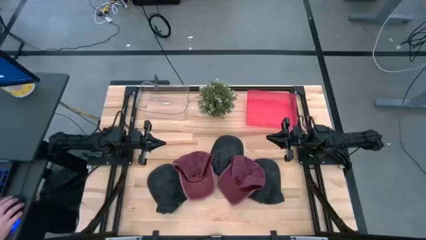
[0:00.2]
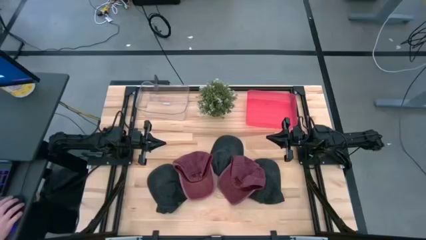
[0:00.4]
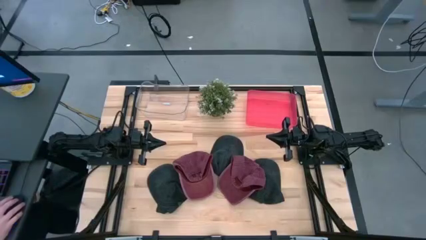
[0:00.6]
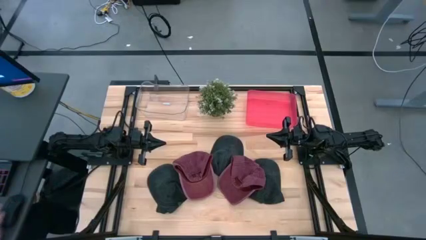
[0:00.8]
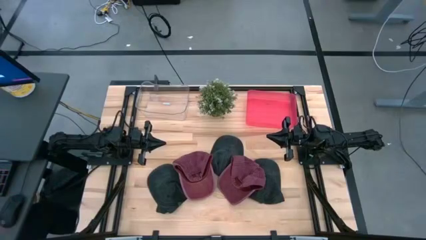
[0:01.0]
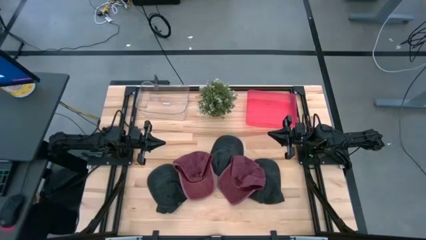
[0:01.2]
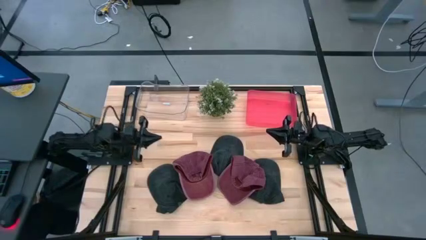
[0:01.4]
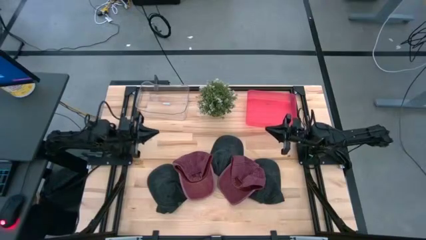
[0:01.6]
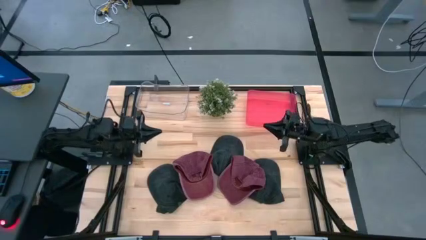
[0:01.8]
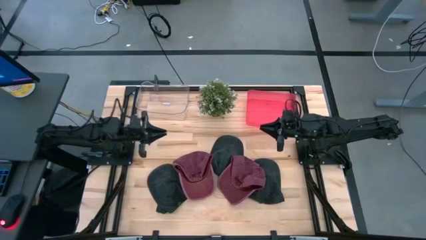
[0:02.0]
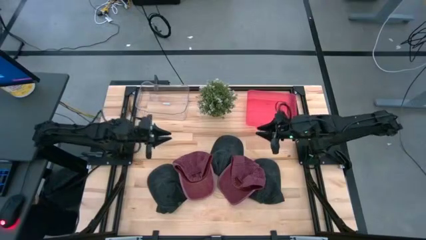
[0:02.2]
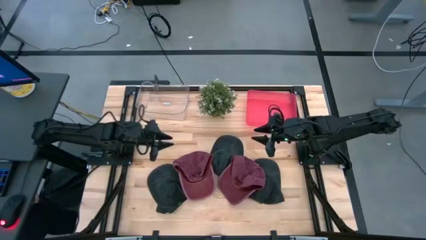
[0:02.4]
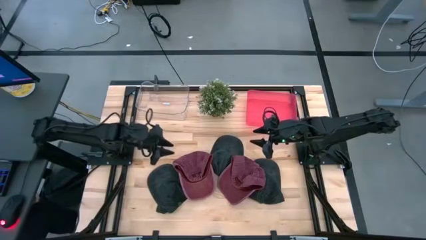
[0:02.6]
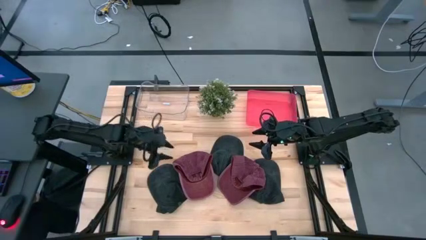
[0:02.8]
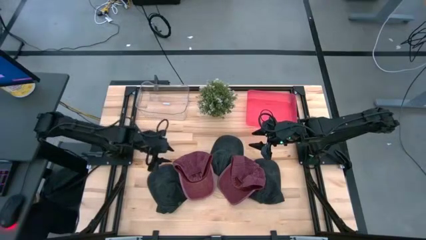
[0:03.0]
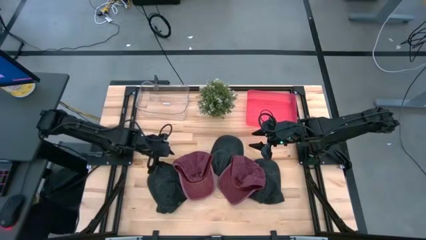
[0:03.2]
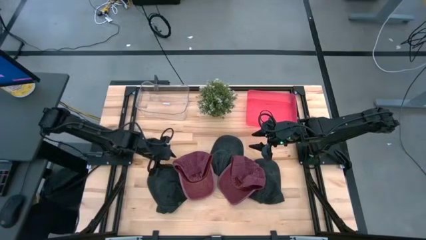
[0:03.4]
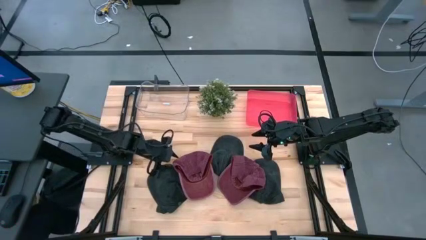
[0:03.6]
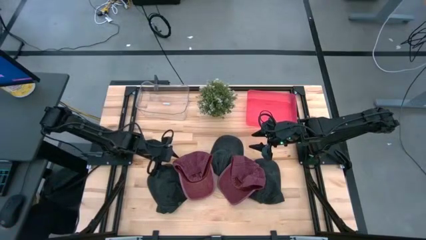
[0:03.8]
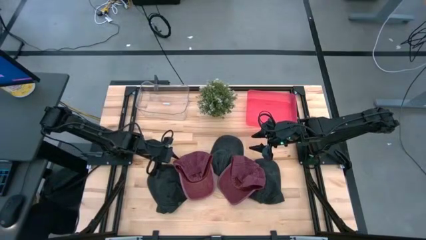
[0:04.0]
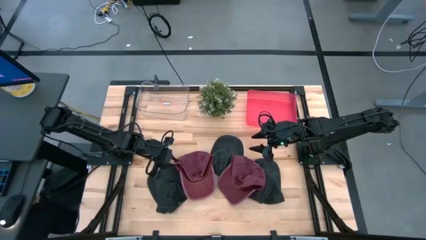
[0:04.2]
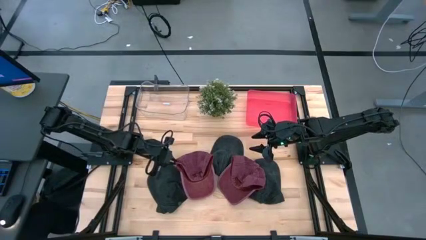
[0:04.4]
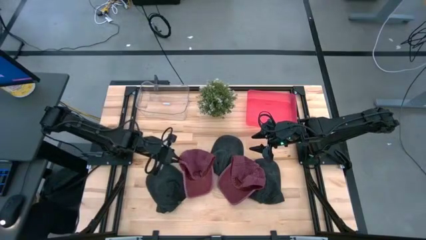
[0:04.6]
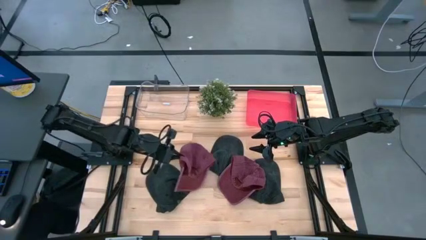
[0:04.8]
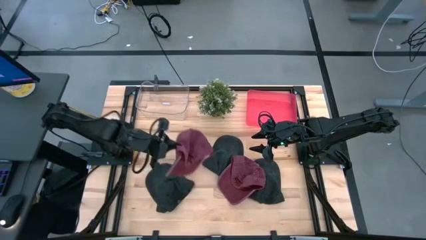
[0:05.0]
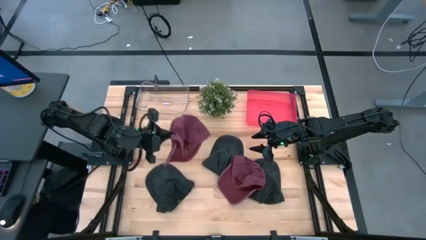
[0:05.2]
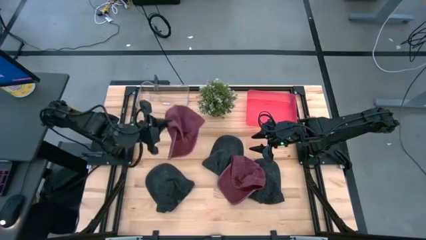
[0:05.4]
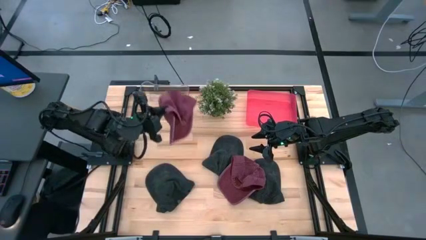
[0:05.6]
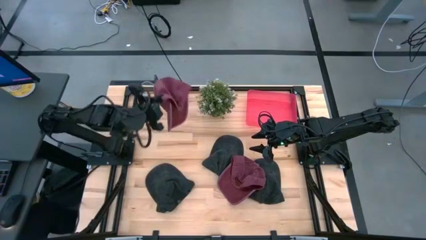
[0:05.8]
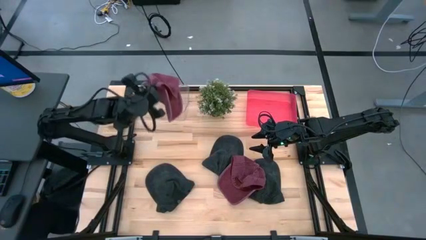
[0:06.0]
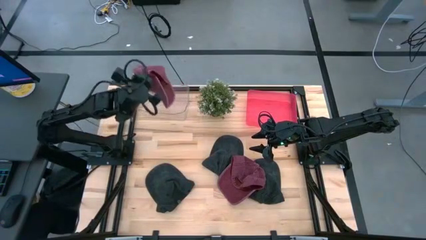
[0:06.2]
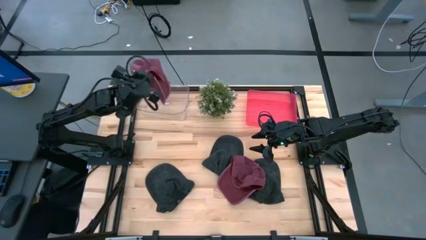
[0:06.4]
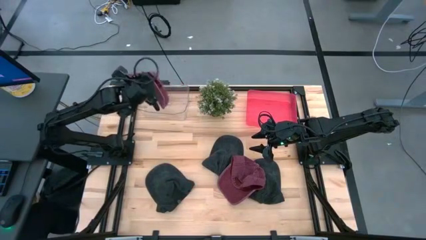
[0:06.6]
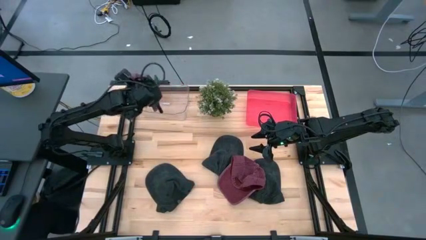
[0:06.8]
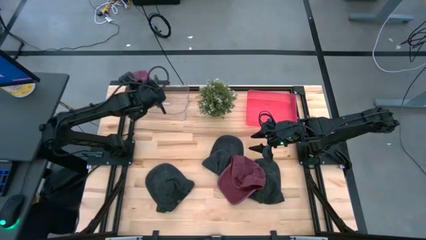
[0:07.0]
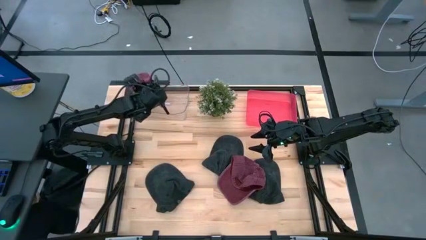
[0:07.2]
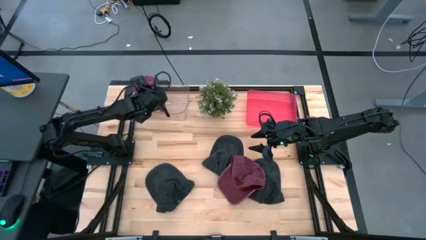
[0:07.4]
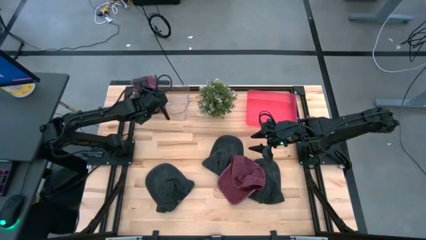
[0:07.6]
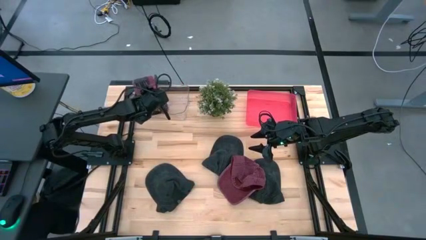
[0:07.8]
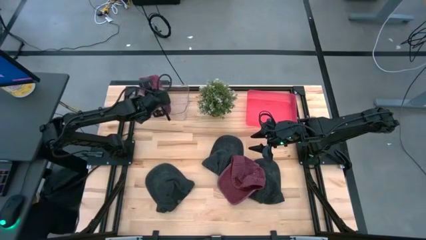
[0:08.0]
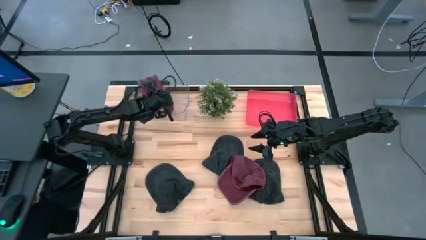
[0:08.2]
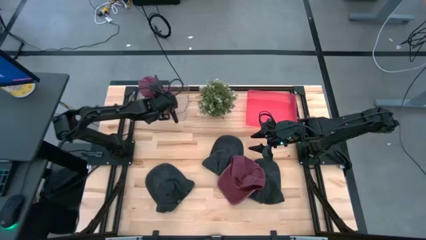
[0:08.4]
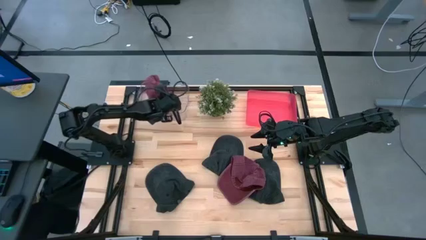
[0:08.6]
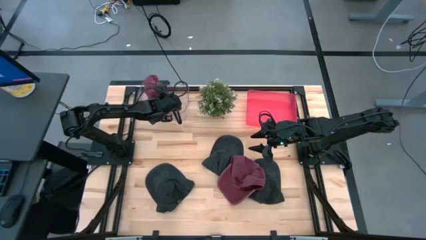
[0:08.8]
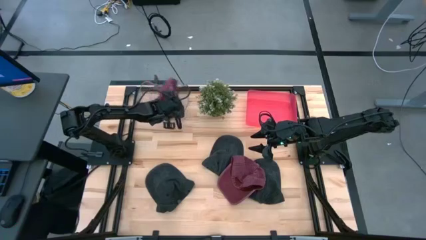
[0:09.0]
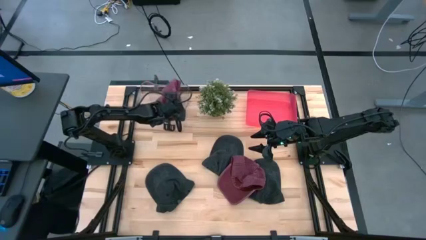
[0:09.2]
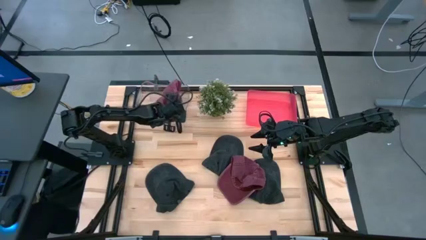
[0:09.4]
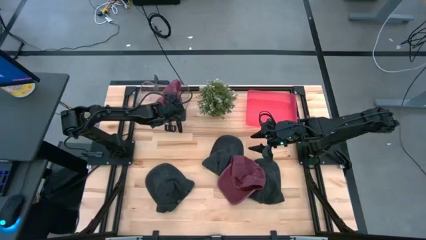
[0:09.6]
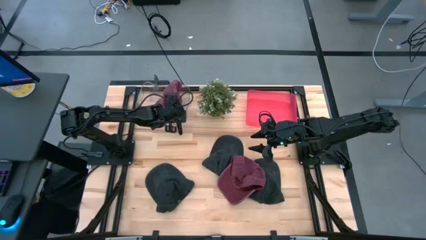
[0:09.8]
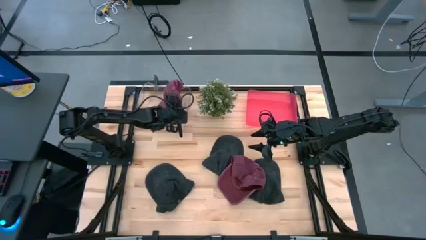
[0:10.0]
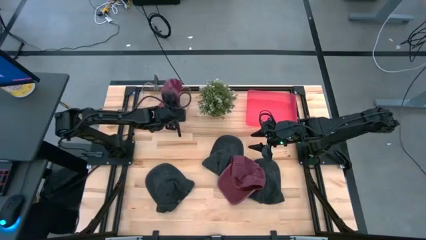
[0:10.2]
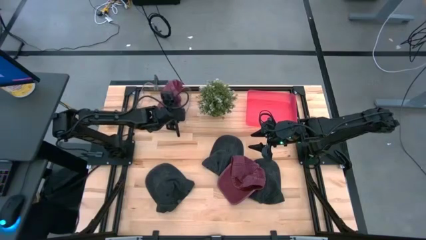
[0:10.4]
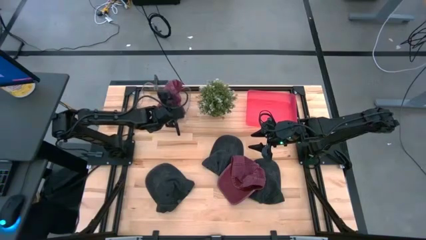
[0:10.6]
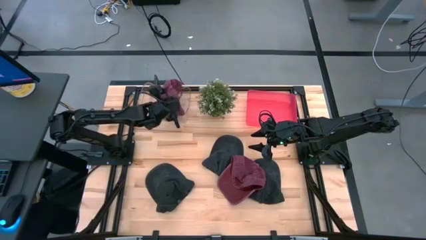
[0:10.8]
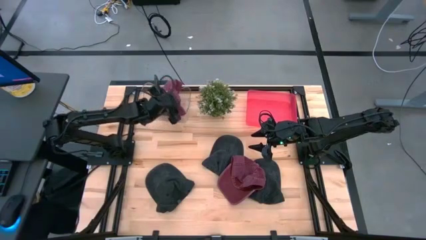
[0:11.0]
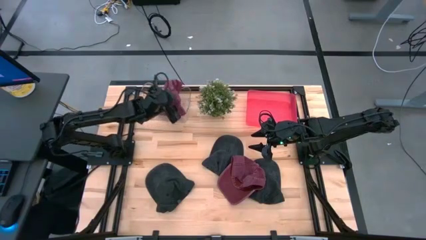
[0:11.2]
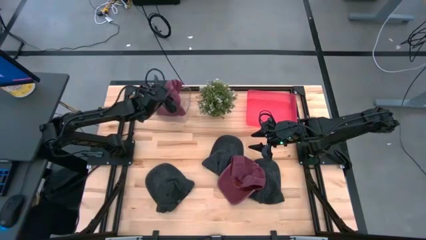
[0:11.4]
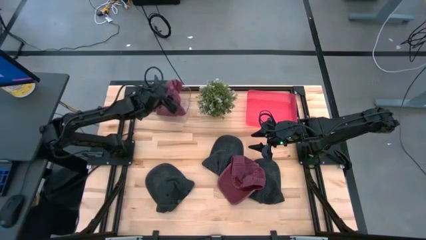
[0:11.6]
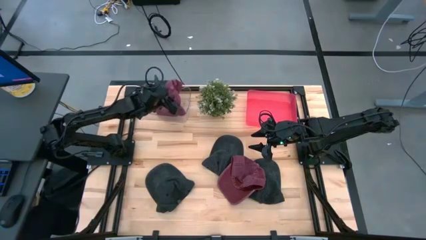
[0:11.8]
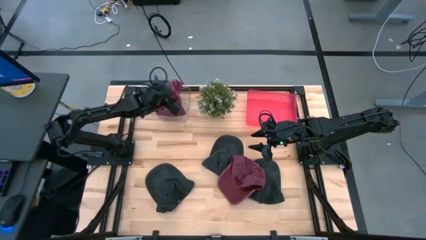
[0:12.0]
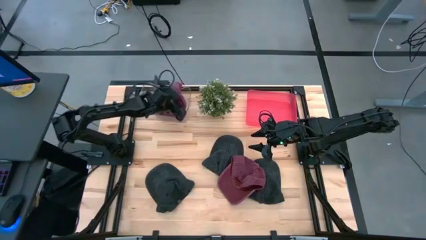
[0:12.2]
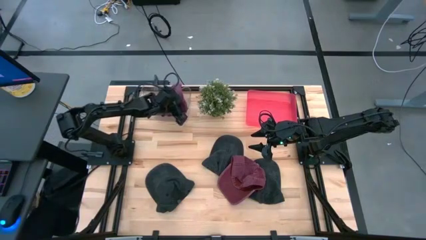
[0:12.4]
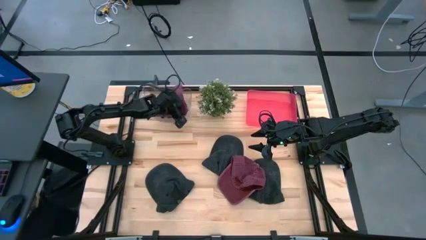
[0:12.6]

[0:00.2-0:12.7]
Task: Pick & Place hat
Put the left red cap into the transparent bin

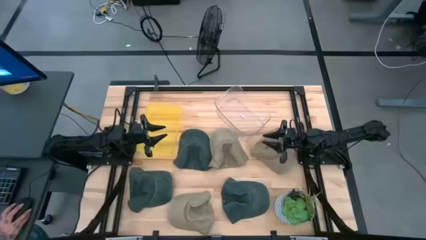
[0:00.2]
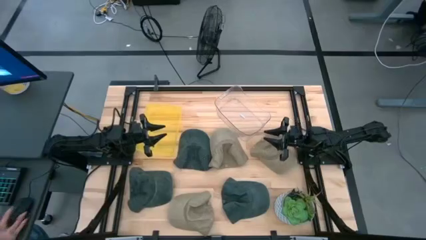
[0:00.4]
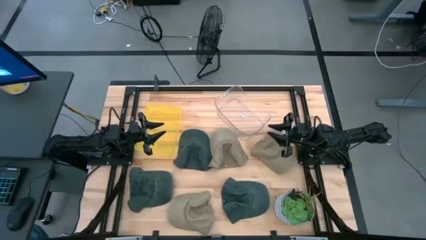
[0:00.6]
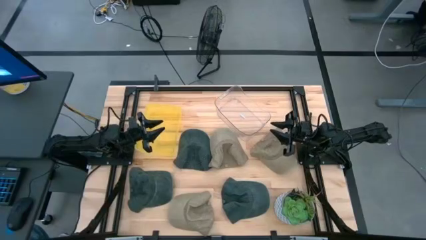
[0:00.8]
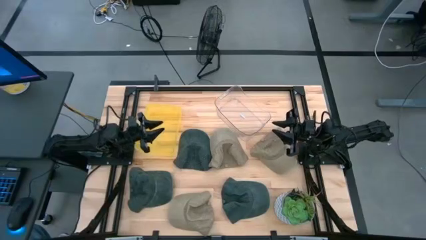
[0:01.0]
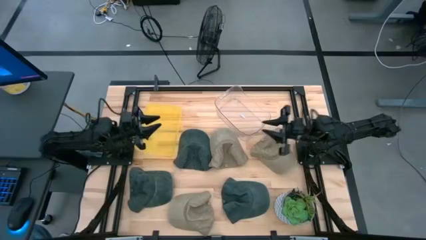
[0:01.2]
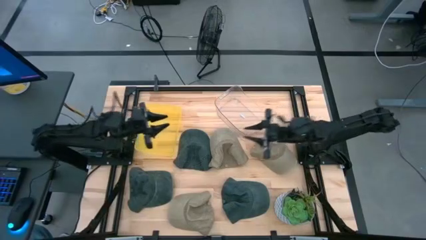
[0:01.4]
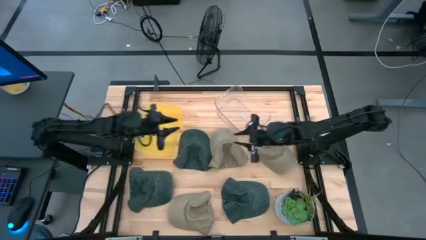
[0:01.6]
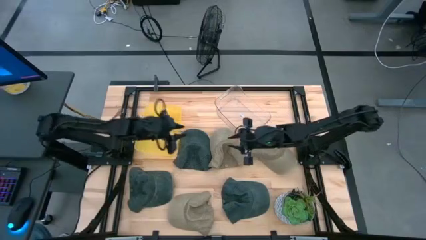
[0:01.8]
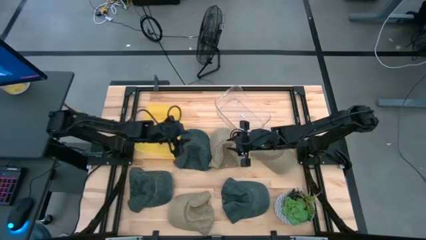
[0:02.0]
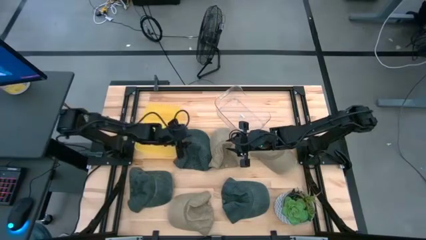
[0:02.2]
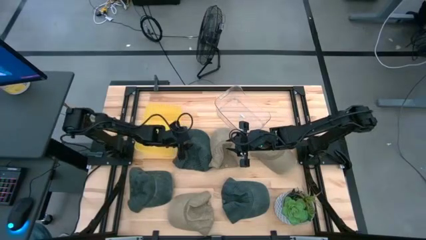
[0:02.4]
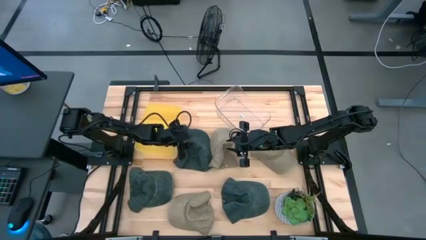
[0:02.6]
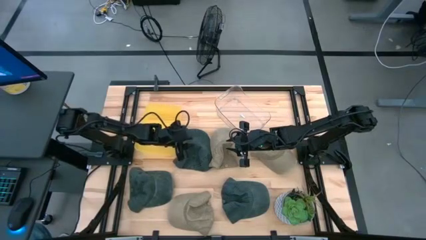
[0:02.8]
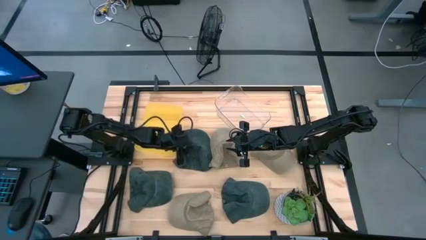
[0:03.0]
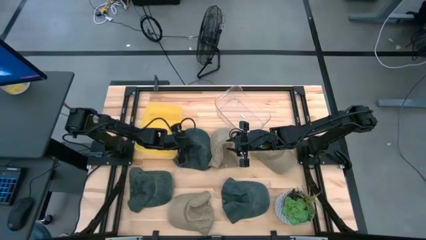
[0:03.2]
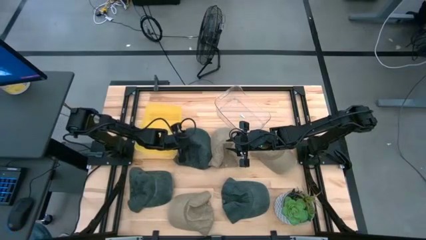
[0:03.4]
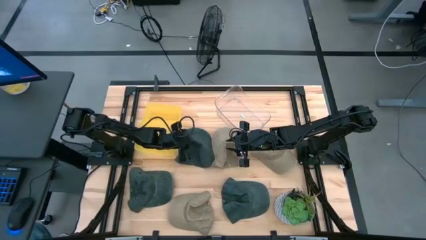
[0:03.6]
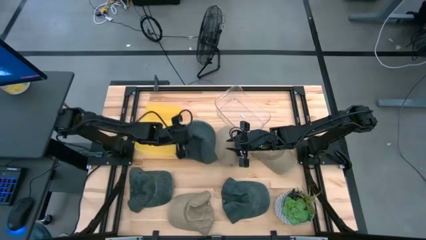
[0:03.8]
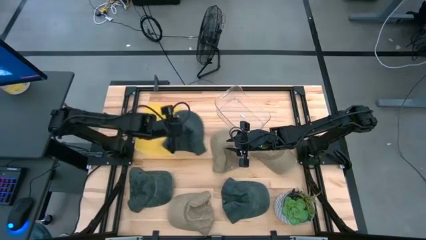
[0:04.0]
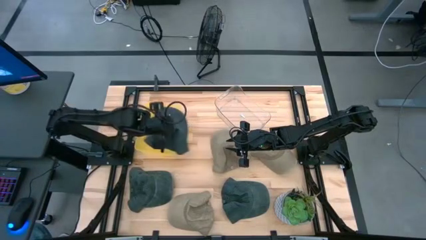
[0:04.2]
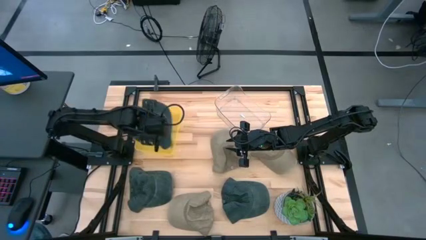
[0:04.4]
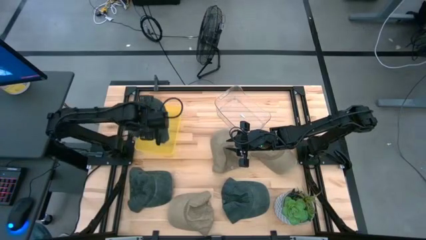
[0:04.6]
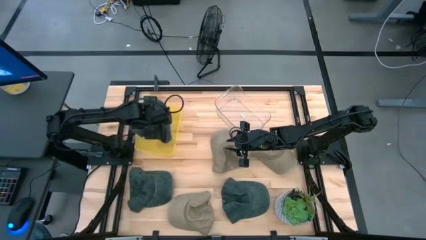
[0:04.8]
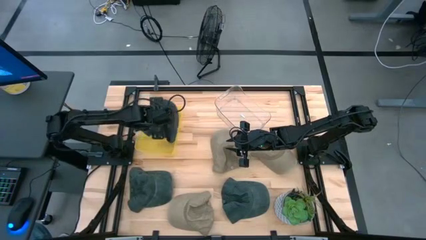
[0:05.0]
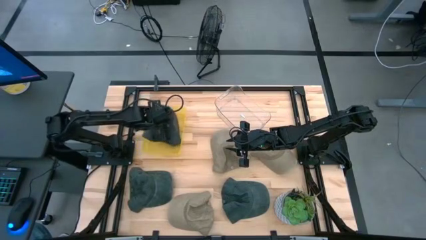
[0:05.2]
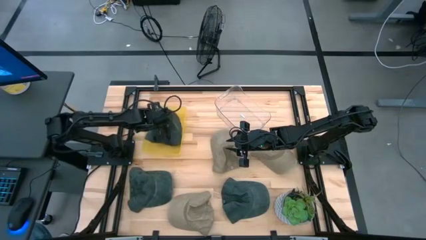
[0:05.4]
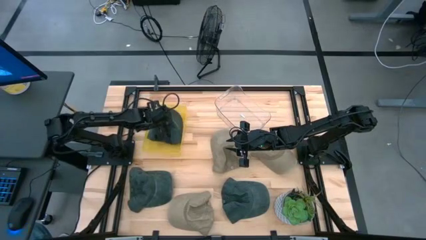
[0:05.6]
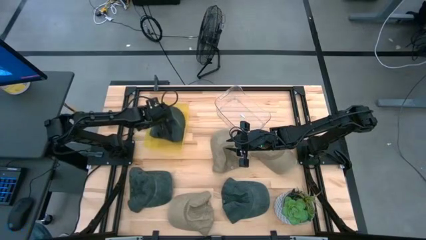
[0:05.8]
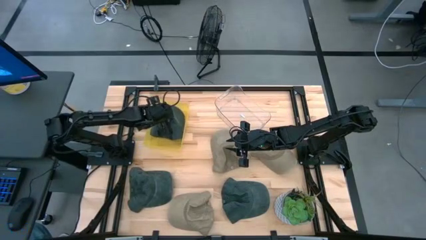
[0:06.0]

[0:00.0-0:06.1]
Task: Pick & Place hat
Put the top black cap into the yellow bin
